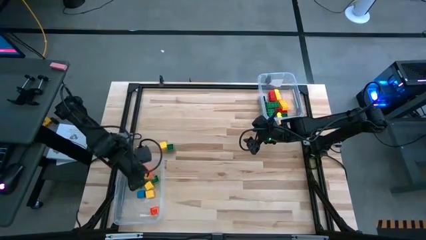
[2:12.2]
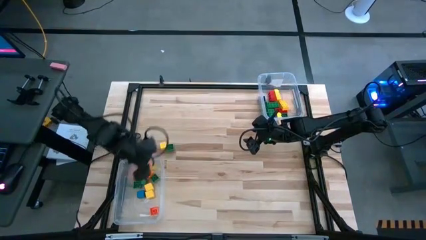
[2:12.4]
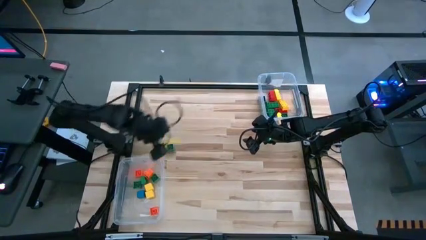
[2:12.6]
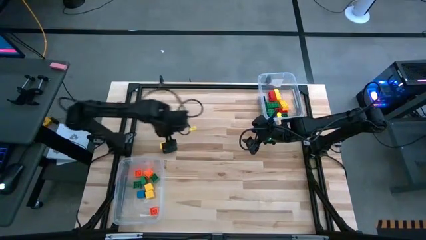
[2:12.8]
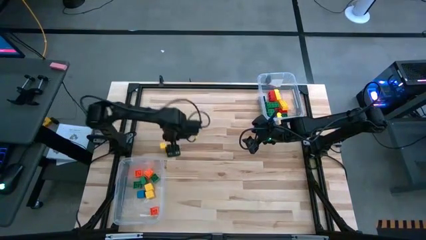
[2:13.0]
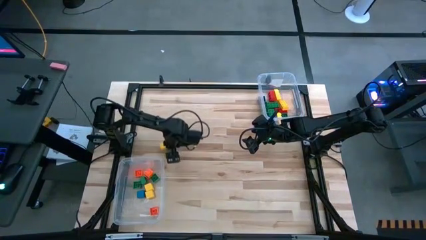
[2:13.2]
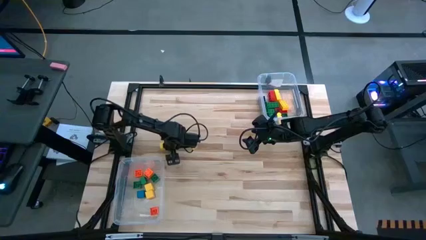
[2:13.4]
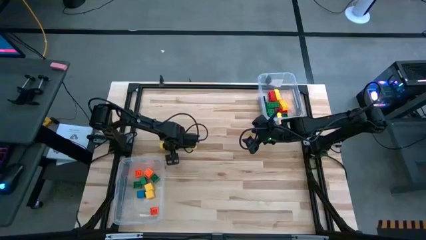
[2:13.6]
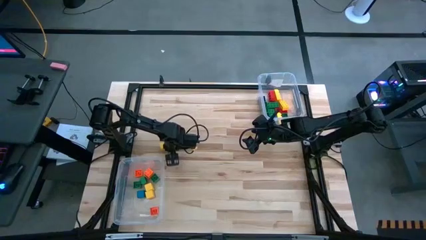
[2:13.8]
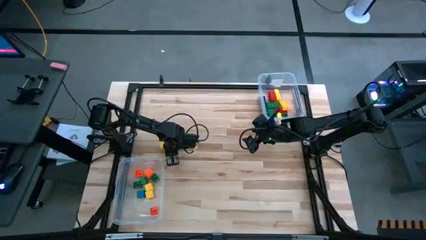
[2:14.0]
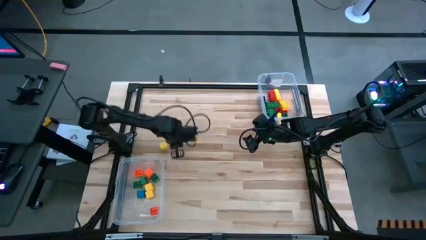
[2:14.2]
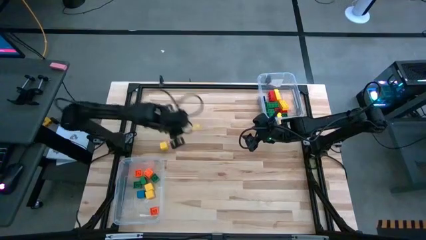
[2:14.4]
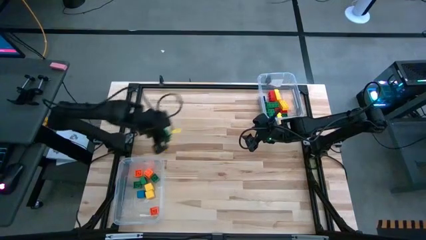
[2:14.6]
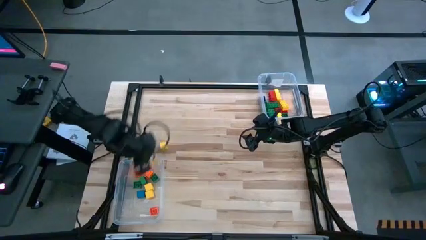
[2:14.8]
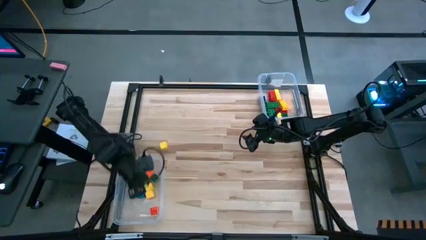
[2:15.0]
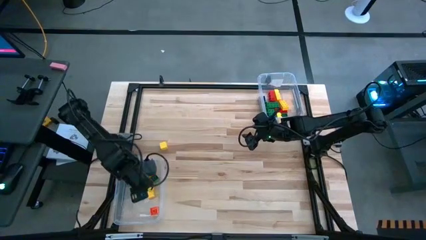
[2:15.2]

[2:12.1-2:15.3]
Task: Sort blocks by size
Put the small green game piece into the left transparent bin

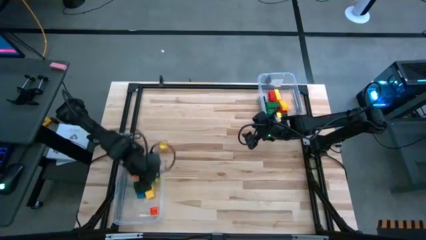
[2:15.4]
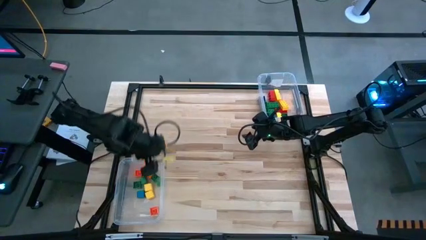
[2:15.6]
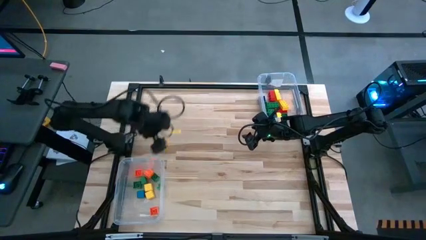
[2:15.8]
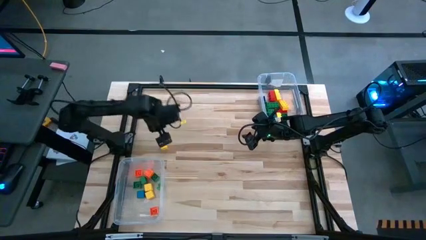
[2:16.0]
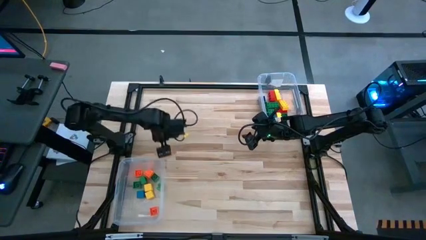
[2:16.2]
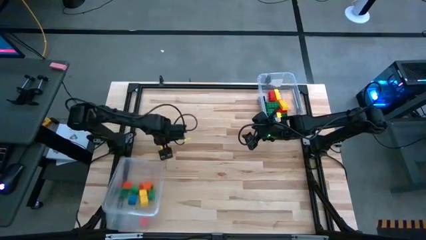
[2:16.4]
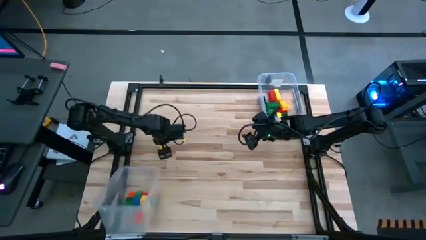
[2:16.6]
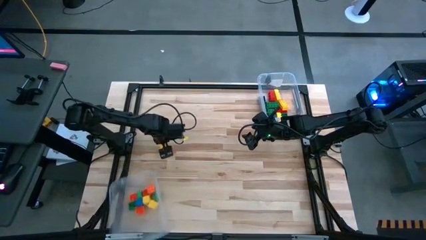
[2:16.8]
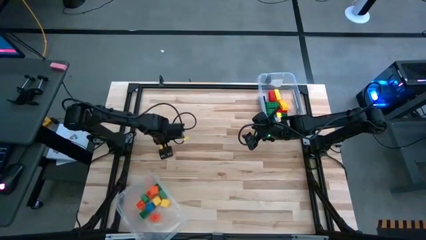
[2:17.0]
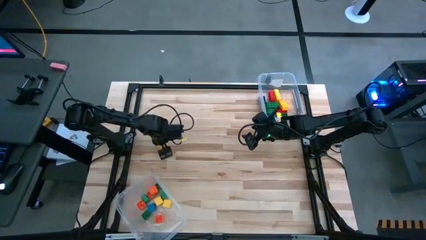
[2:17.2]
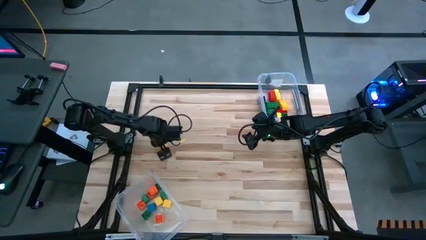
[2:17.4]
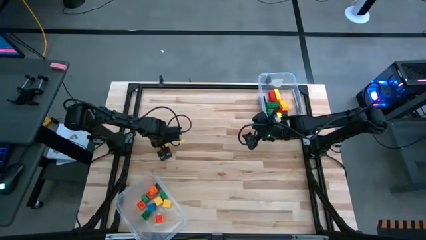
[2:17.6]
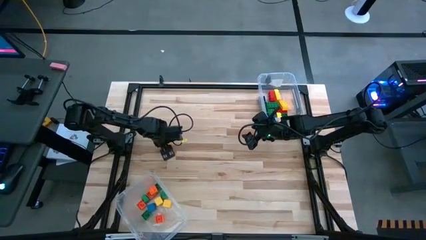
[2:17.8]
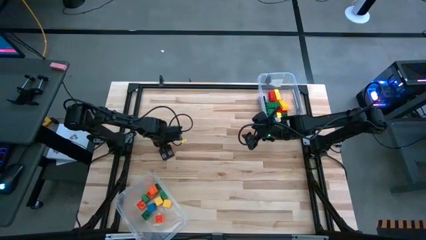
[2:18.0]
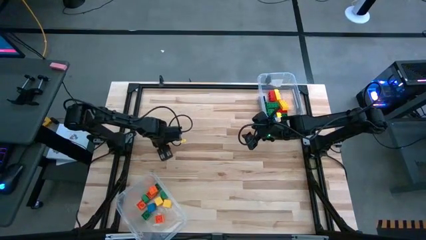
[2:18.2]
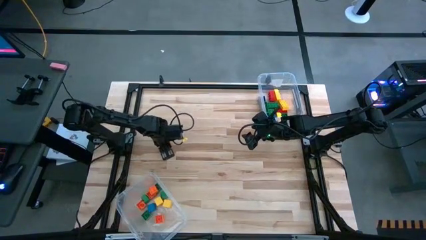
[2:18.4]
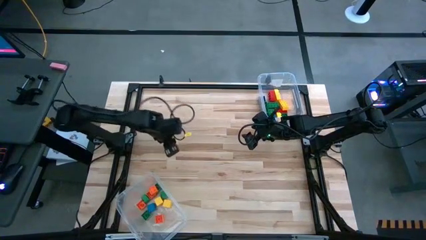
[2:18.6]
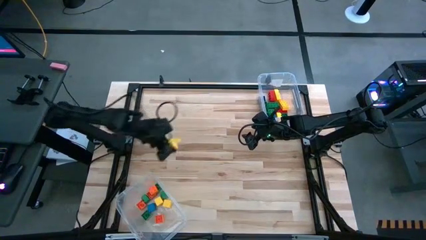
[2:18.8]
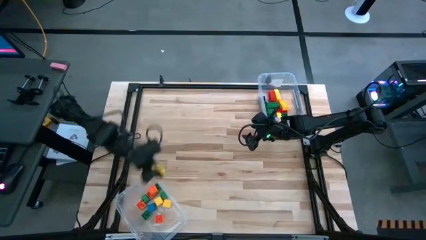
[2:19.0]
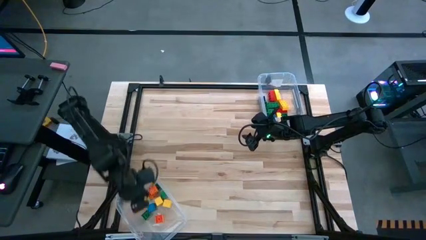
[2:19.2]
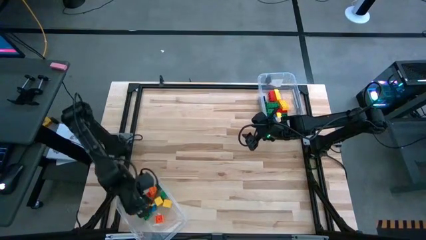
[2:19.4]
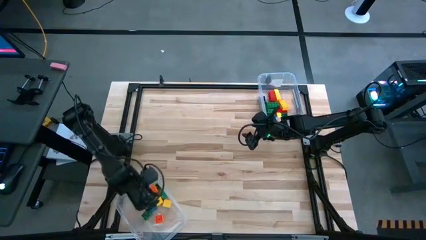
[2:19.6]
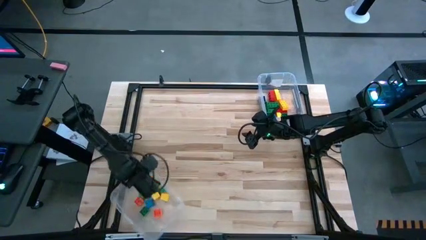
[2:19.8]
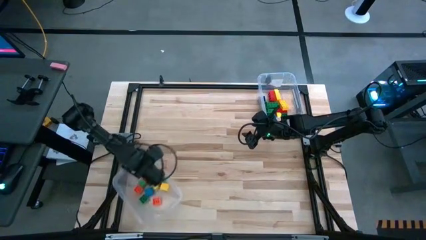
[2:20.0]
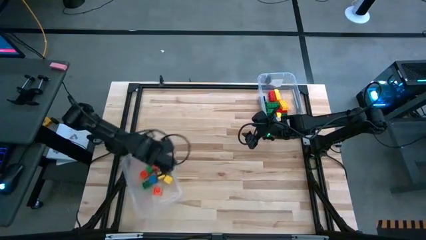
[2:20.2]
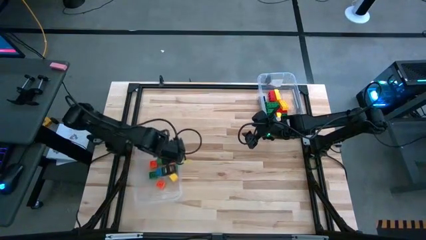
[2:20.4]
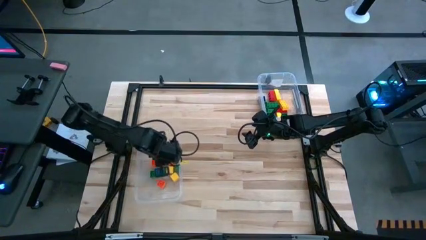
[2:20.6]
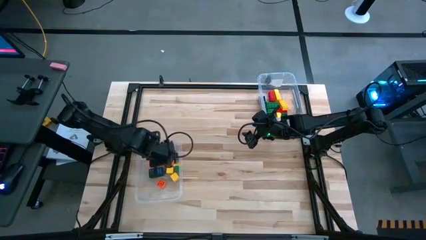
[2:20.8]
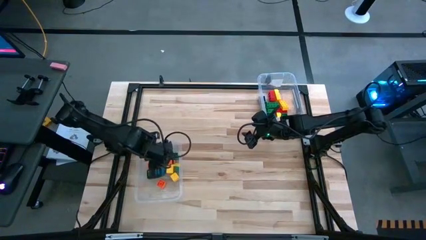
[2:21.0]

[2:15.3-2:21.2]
Put the small yellow block into the left transparent bin

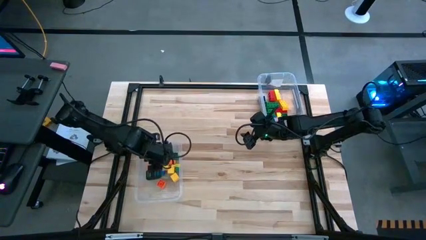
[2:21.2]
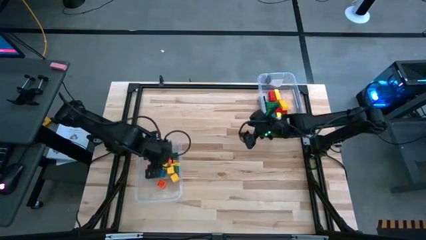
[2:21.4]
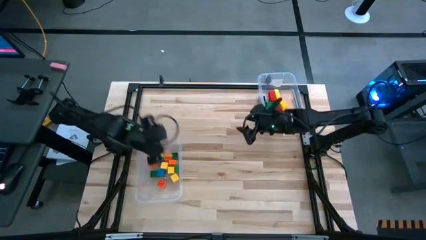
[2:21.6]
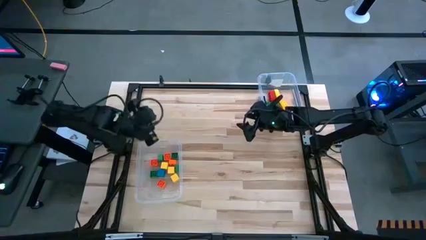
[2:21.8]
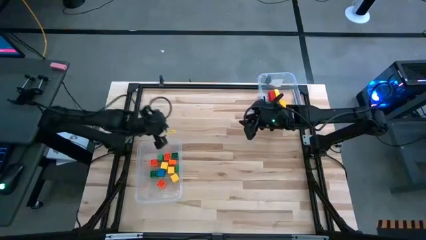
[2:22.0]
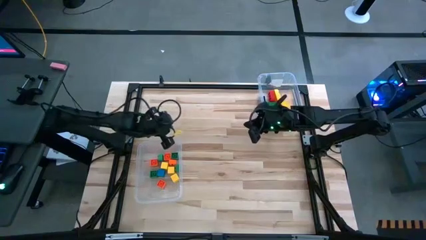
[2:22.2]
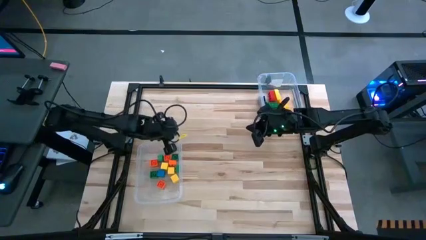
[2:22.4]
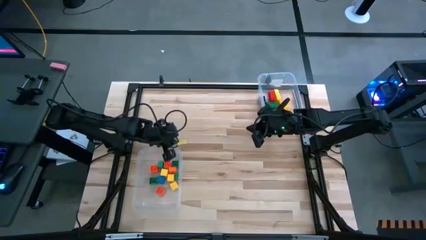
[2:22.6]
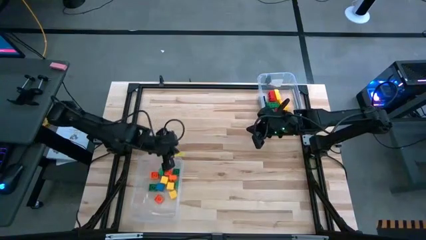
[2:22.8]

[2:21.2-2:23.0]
Move the left transparent bin to the bottom

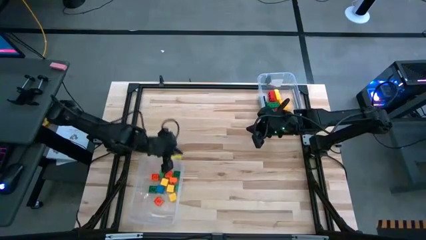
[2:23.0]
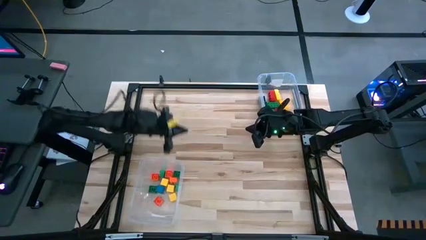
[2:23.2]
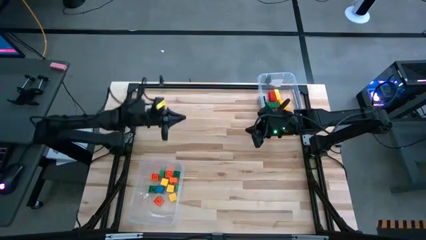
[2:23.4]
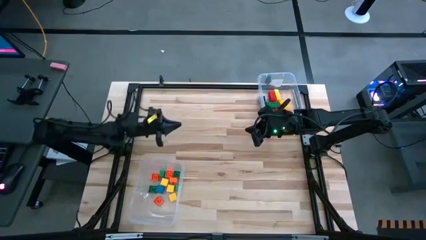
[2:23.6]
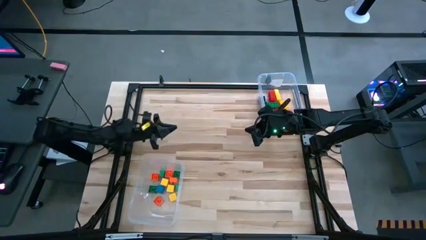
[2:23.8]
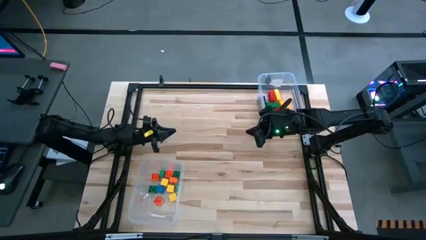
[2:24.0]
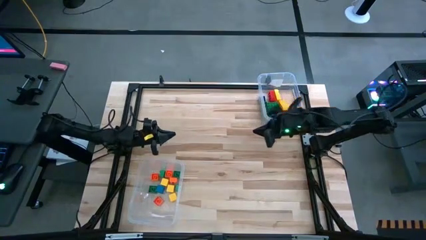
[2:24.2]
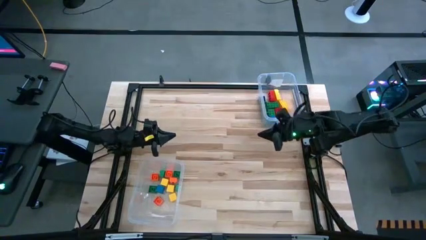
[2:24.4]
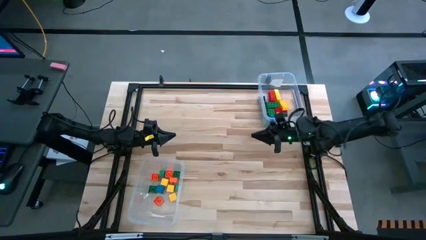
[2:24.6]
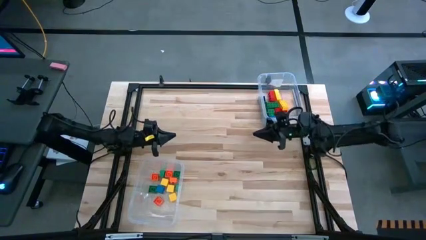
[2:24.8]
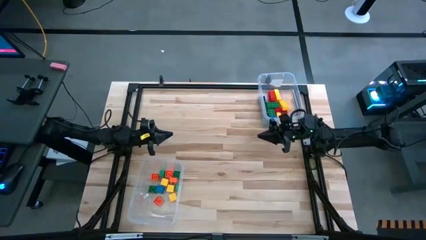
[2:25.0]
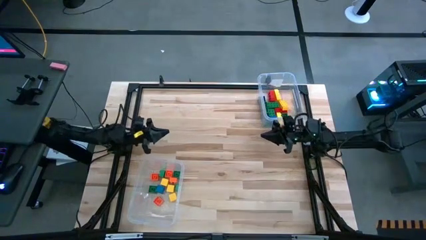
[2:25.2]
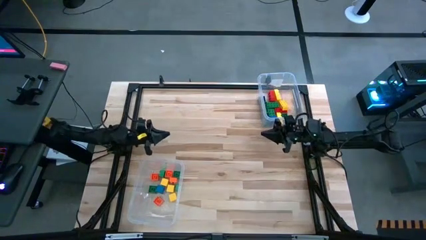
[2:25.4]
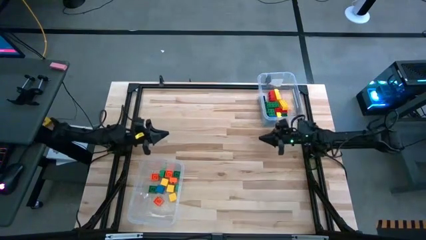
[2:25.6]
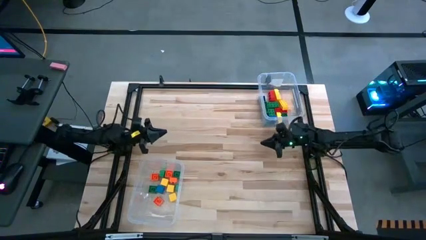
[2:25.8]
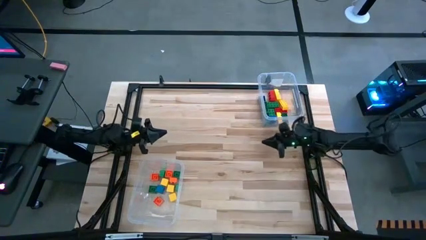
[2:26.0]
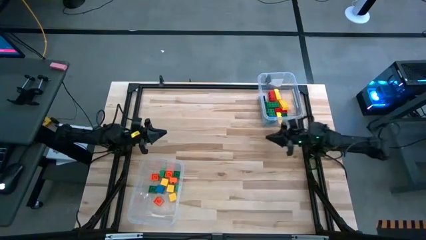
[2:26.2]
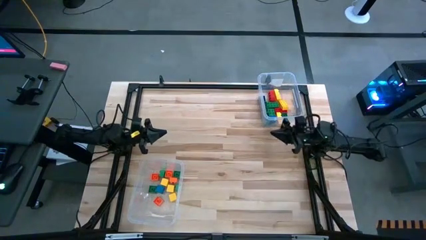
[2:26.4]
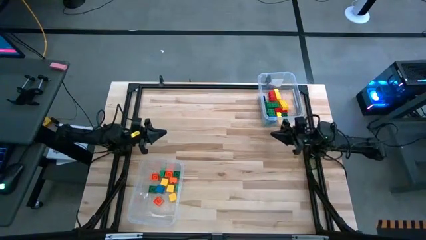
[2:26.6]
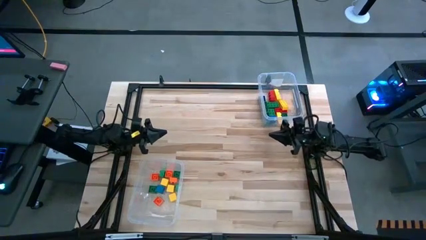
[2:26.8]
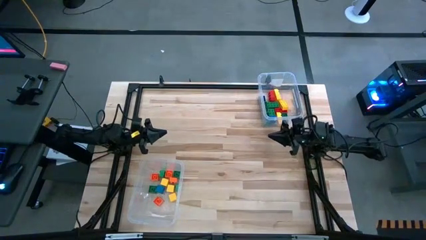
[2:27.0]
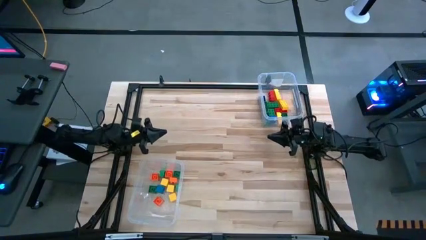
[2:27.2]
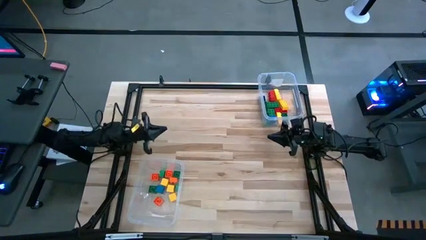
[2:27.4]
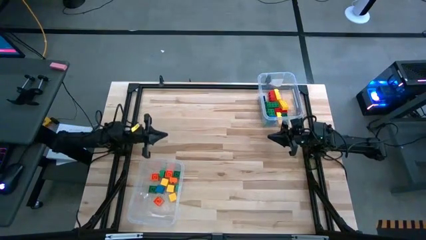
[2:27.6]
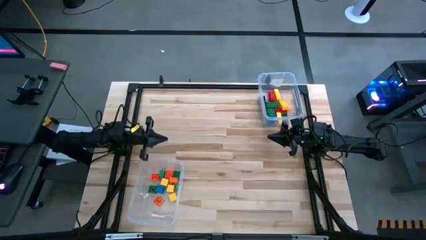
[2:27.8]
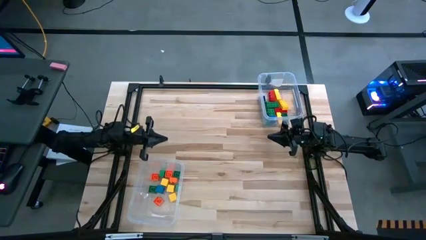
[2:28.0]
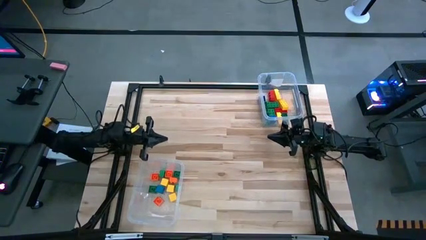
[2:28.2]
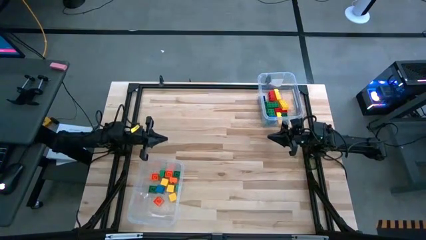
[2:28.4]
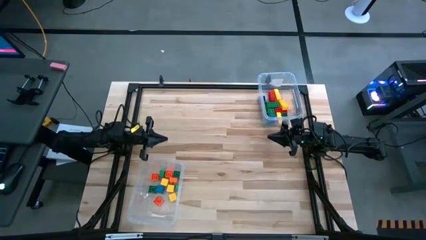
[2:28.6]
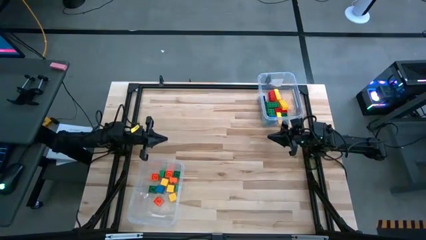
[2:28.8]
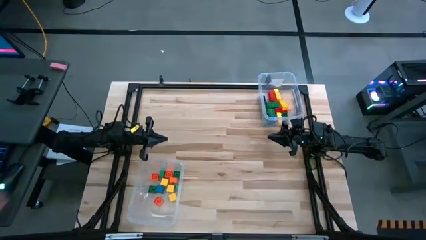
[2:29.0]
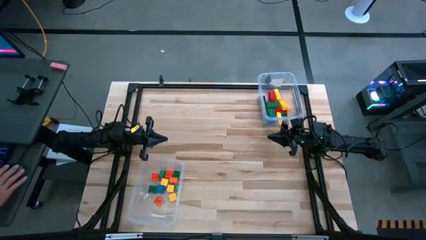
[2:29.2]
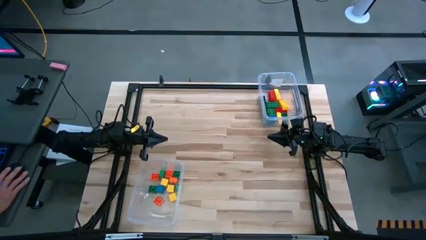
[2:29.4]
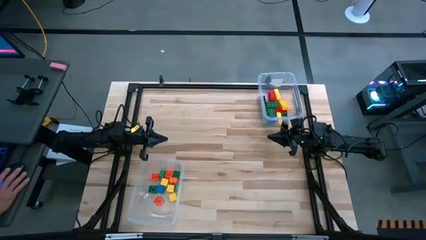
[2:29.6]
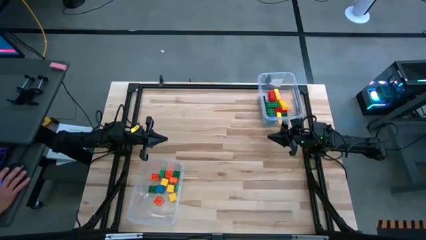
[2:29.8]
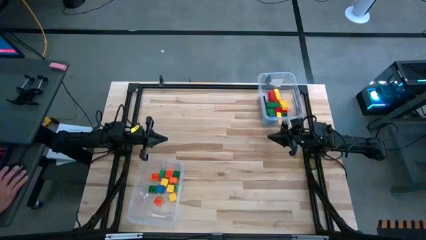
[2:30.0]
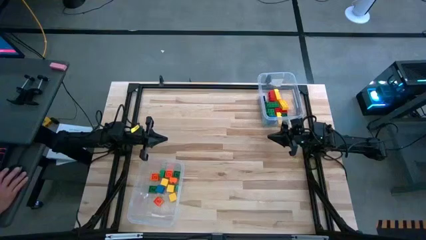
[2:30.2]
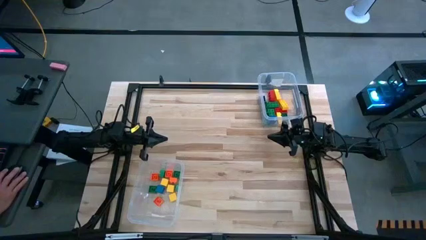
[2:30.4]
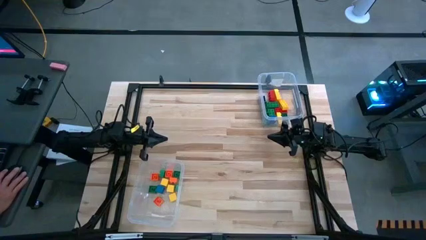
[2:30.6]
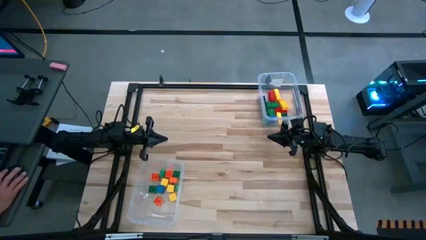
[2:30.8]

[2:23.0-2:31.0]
Return to Home Position
